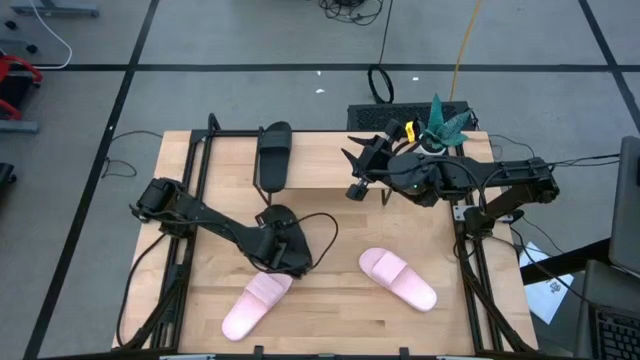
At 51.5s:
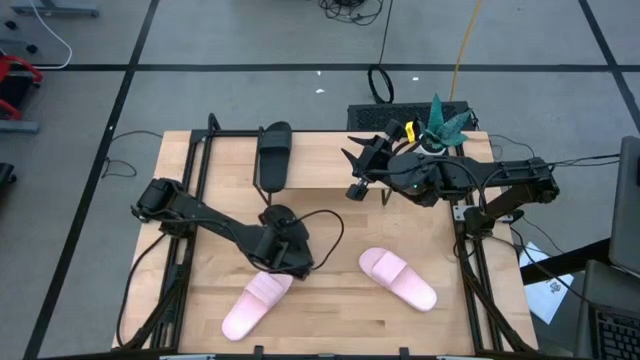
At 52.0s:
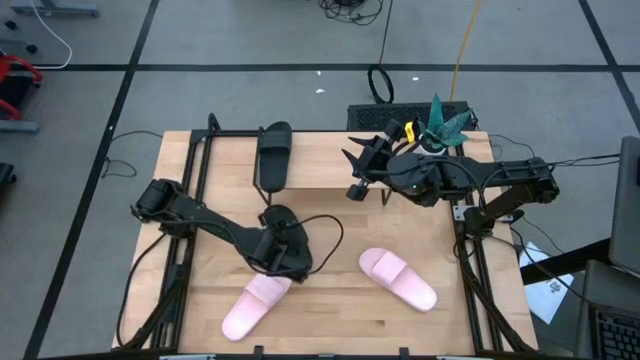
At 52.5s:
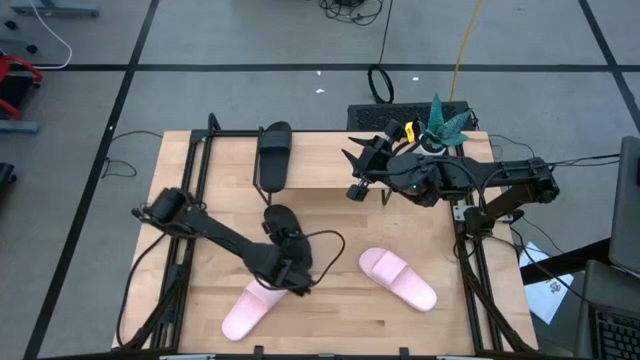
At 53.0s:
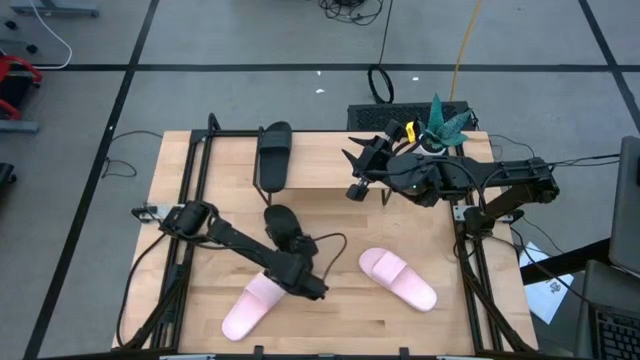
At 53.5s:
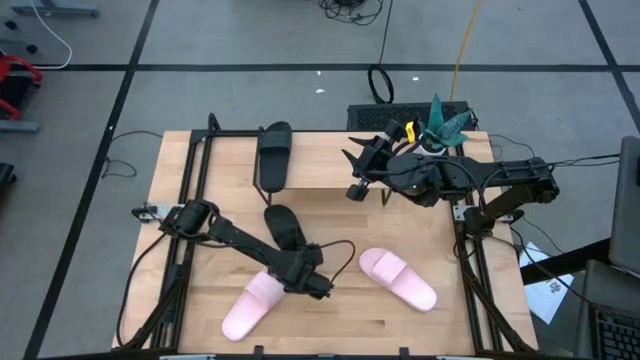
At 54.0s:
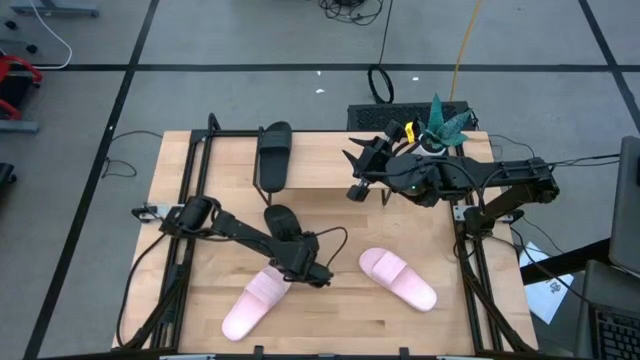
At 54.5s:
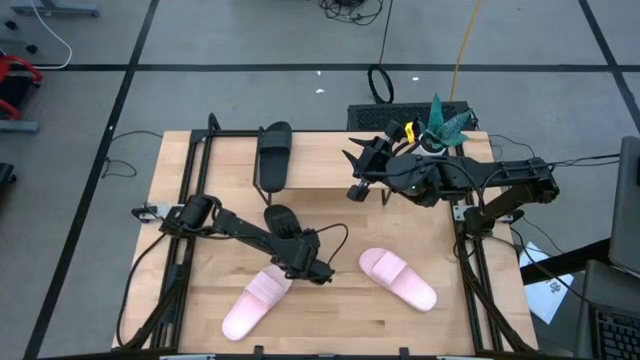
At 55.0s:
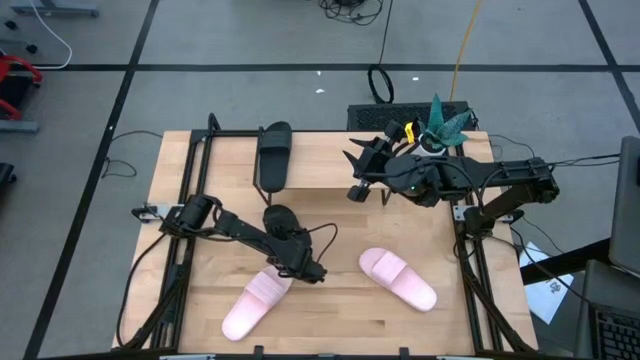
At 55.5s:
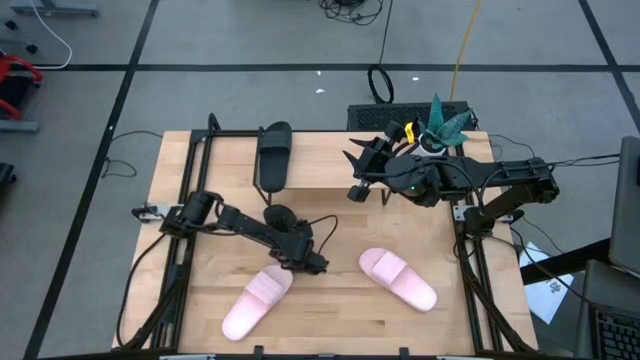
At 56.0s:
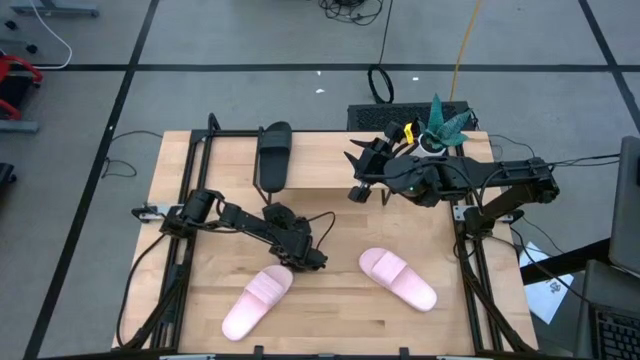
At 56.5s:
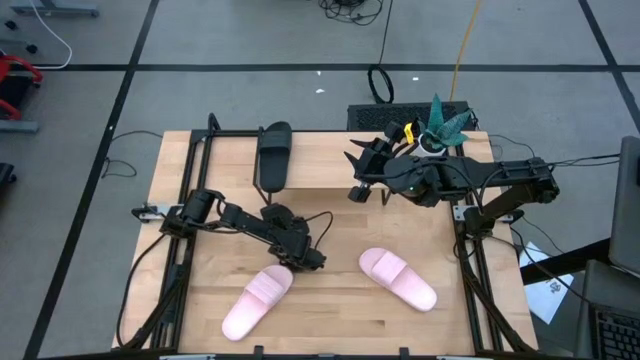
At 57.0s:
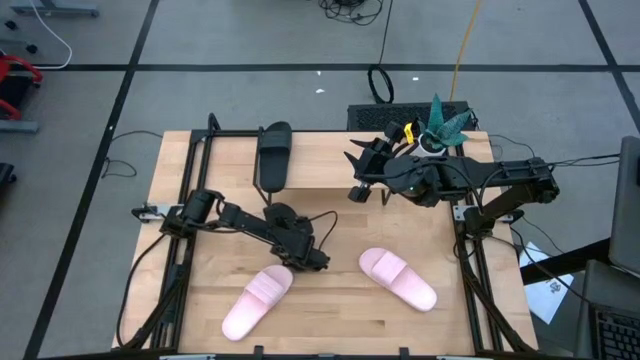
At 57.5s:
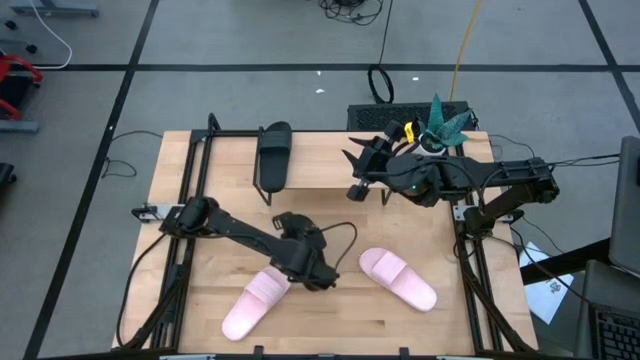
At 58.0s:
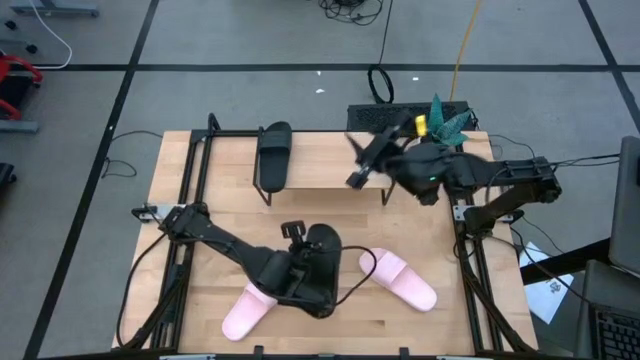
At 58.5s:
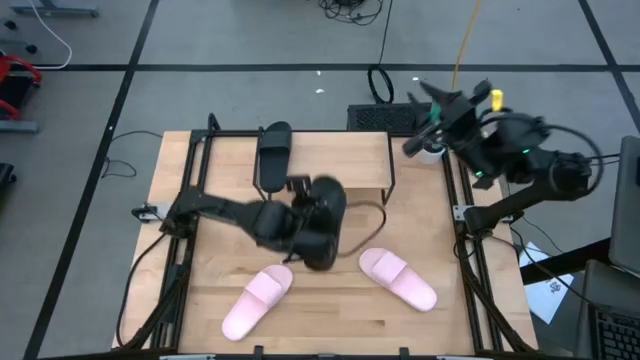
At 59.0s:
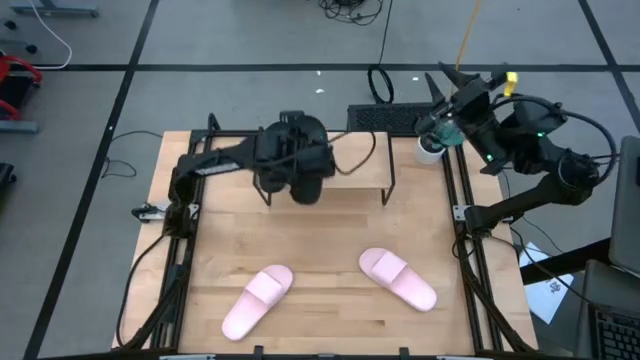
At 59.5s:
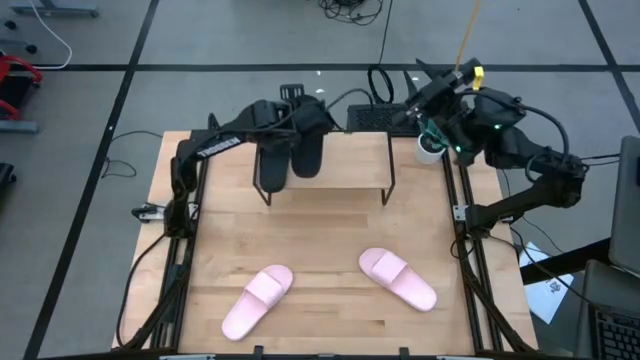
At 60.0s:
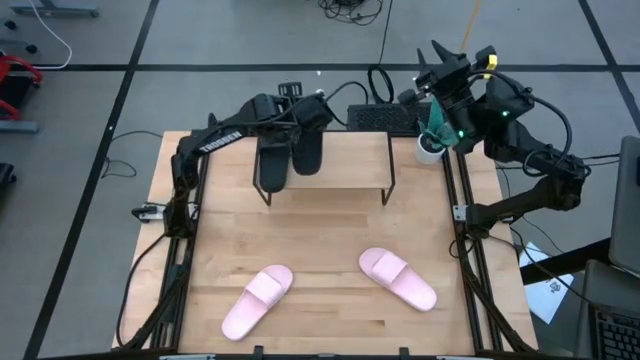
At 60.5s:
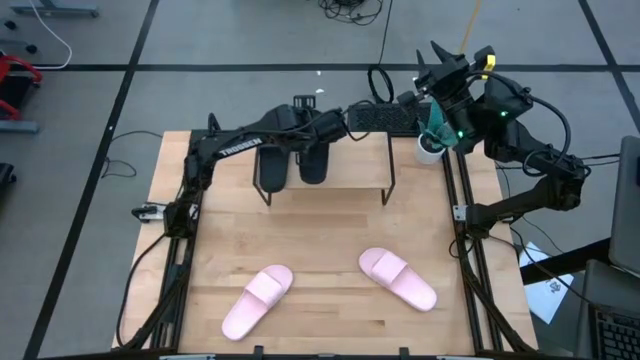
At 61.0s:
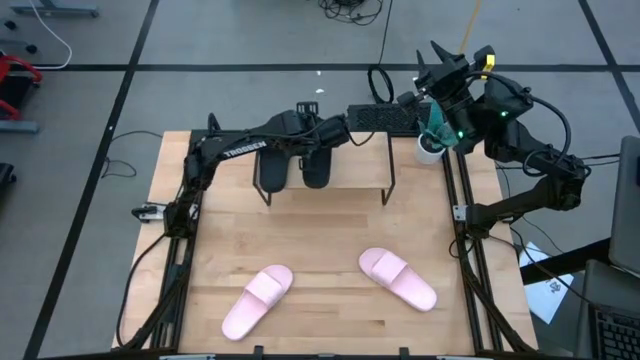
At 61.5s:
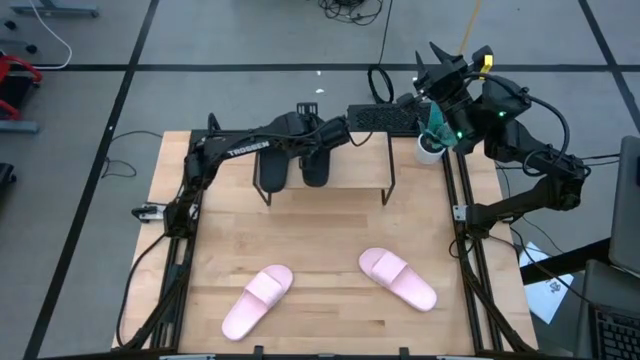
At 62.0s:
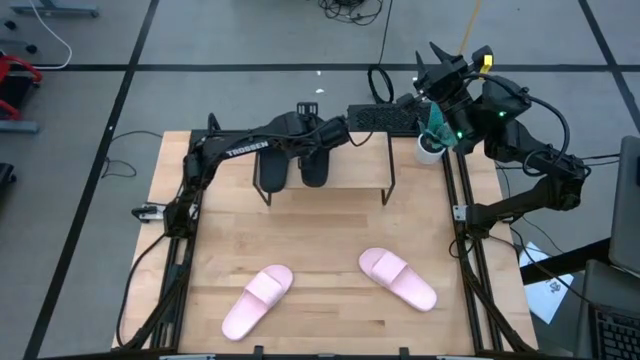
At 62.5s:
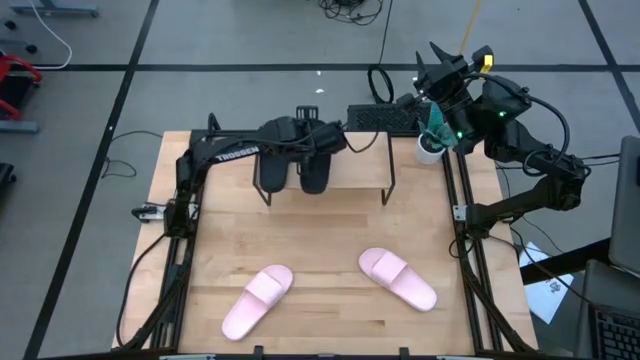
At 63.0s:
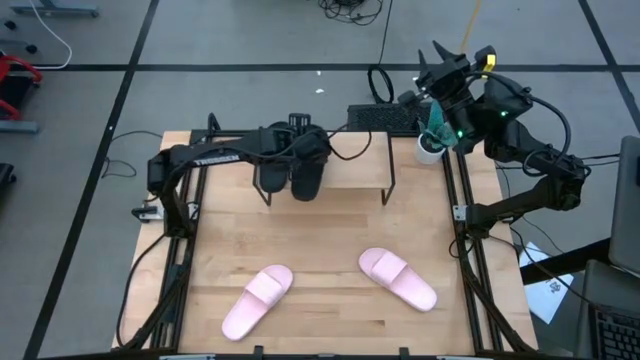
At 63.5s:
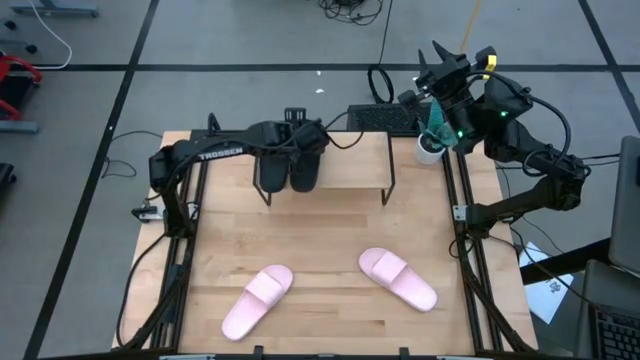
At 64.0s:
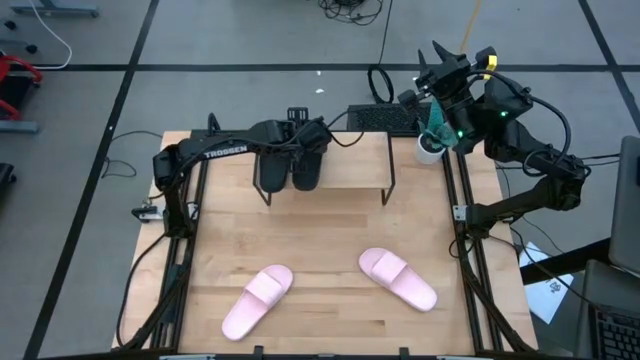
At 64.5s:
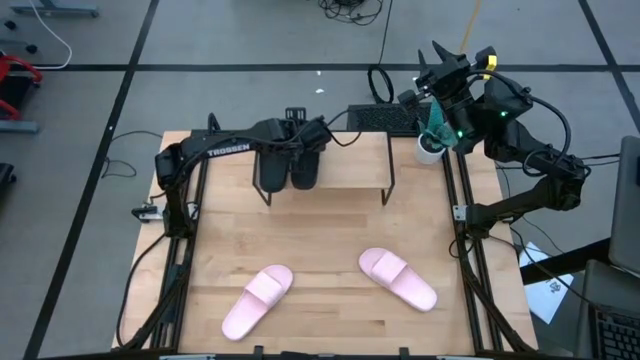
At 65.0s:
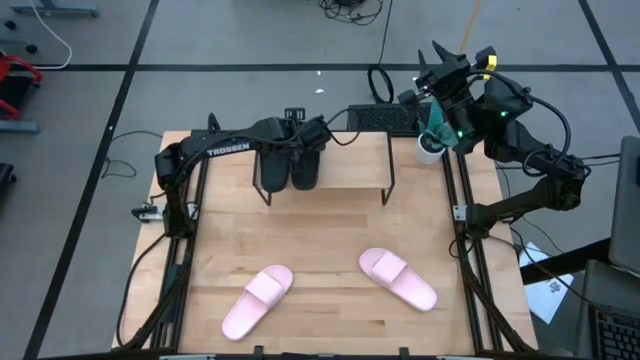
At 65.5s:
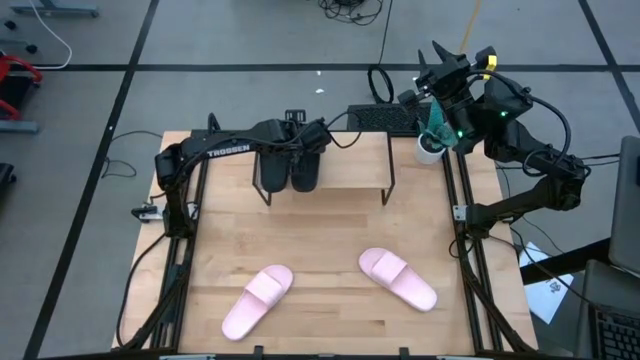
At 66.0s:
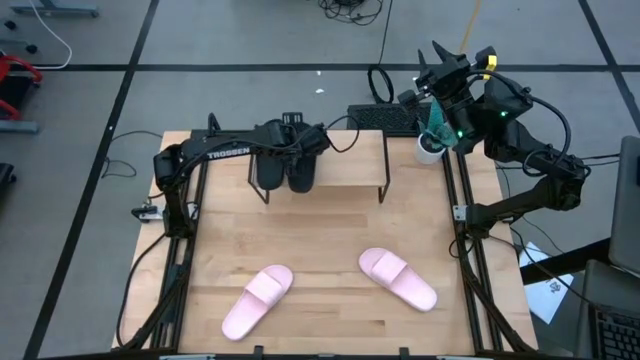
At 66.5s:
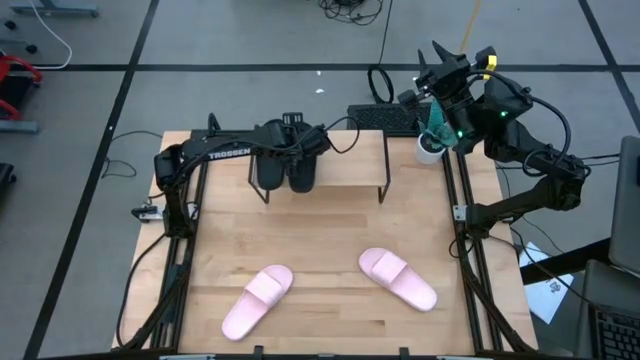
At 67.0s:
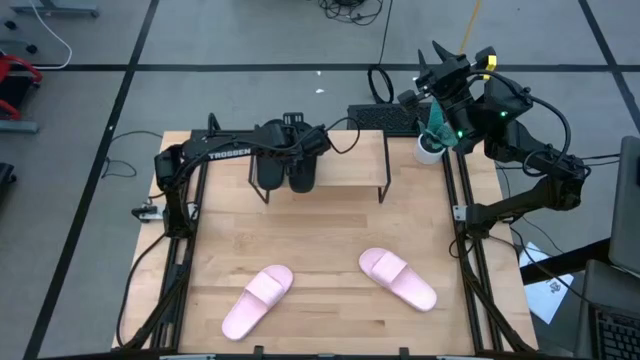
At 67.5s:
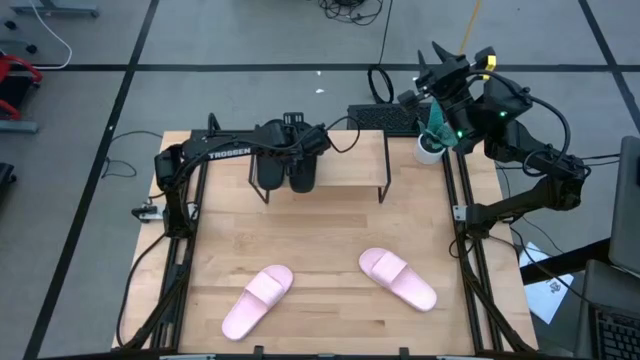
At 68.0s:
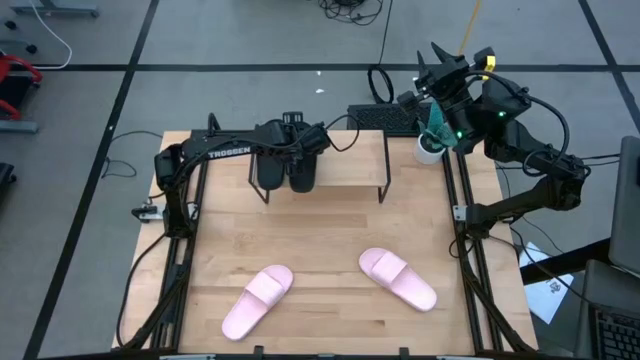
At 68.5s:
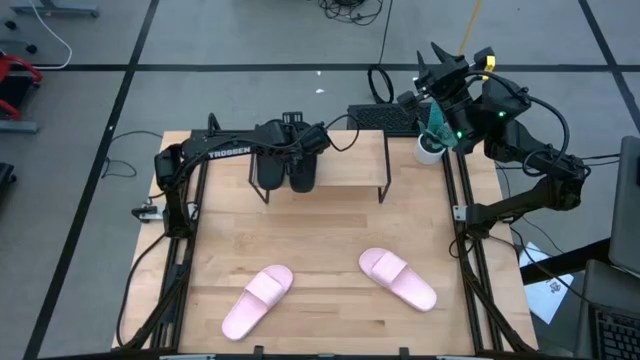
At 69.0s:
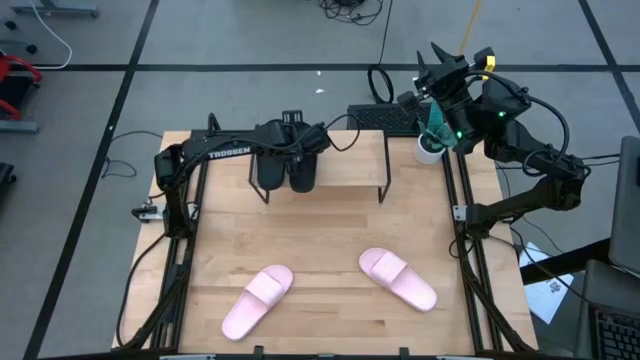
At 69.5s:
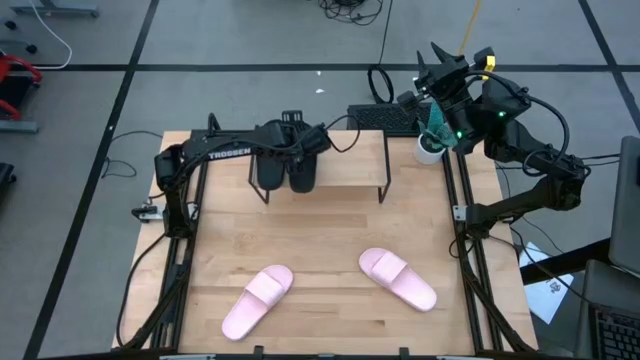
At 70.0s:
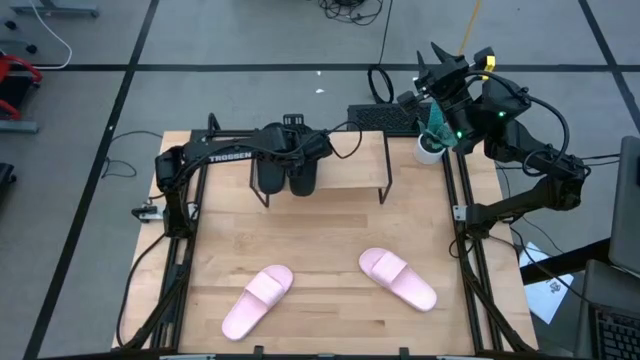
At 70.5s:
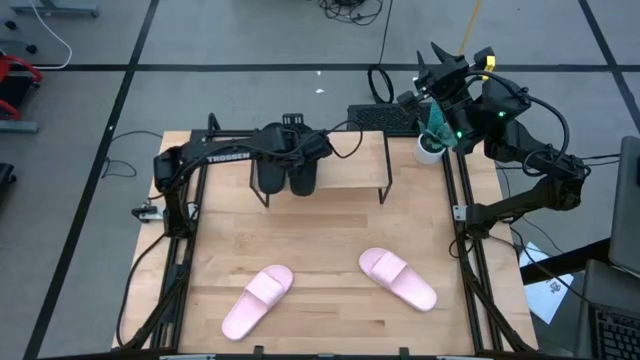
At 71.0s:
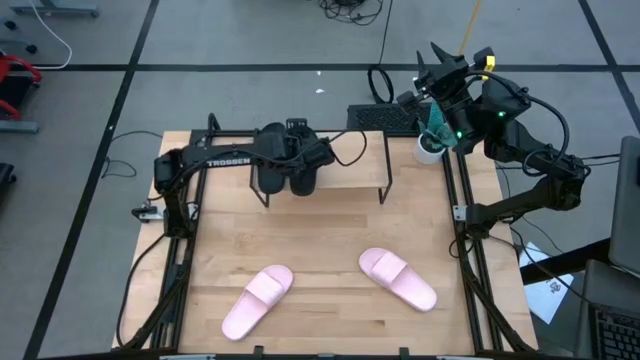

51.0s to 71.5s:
Task: Pick and place slides into the shelf
Put the black slipper on the shelf

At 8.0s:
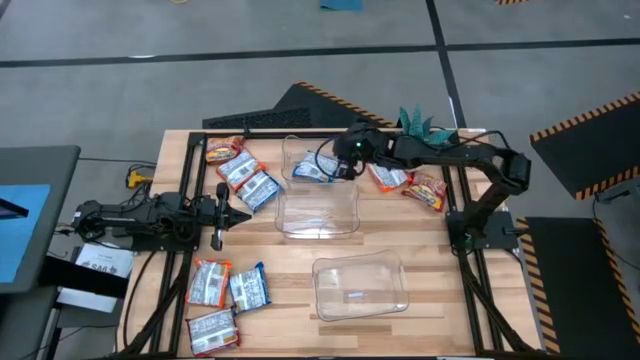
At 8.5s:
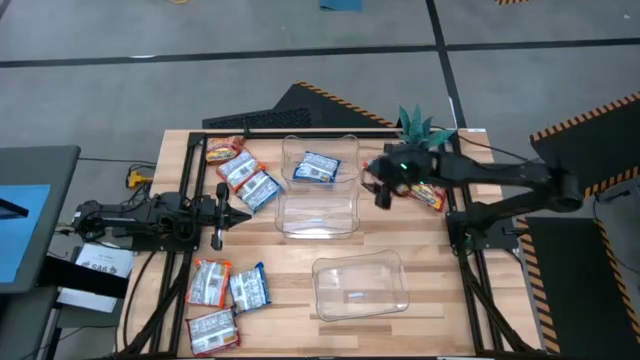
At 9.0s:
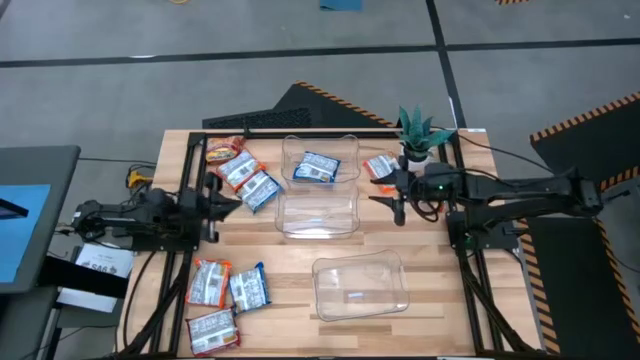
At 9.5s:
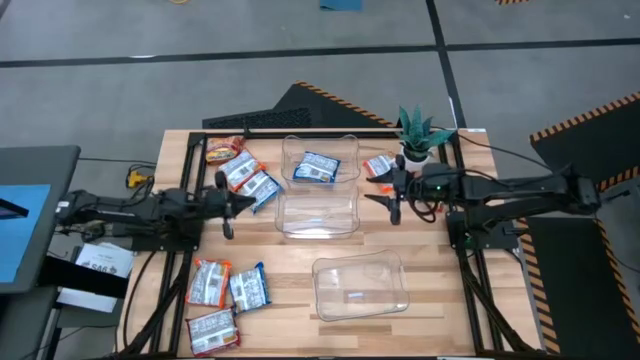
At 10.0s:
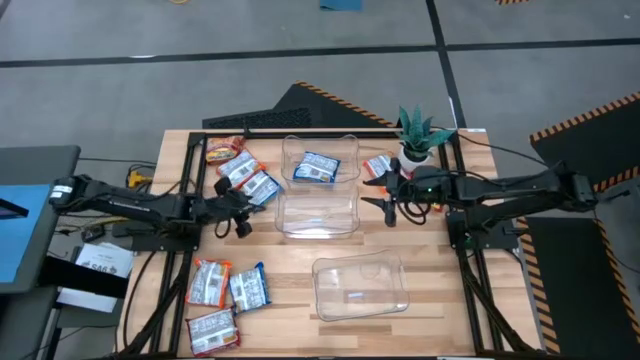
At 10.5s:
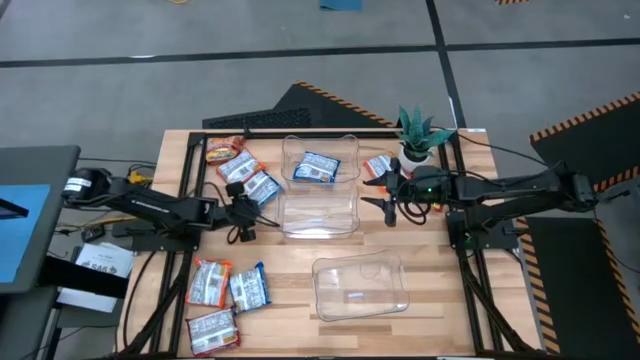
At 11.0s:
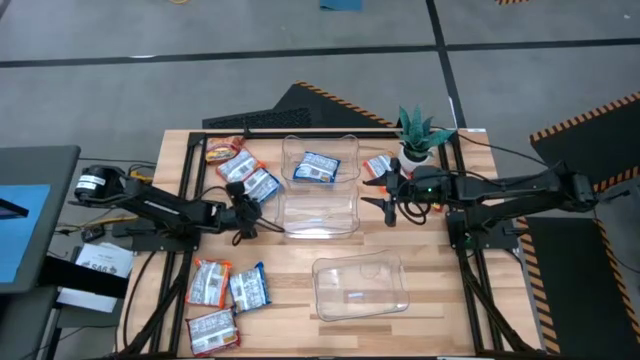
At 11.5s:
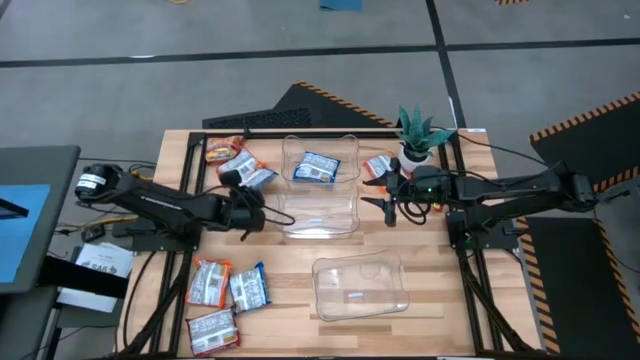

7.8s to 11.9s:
Task: Sort Maruchan noodles
Put the top blue noodle pack into the top transparent bin
